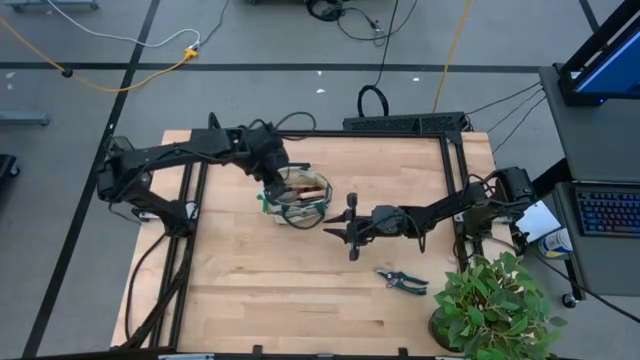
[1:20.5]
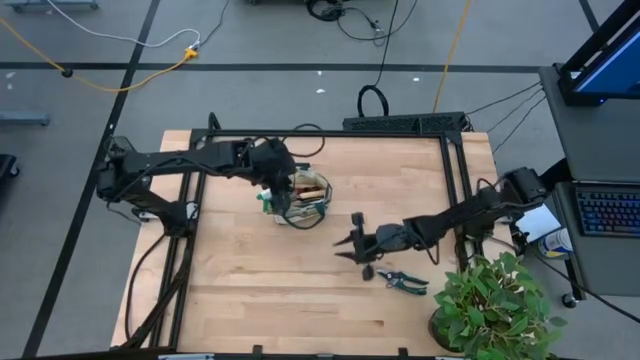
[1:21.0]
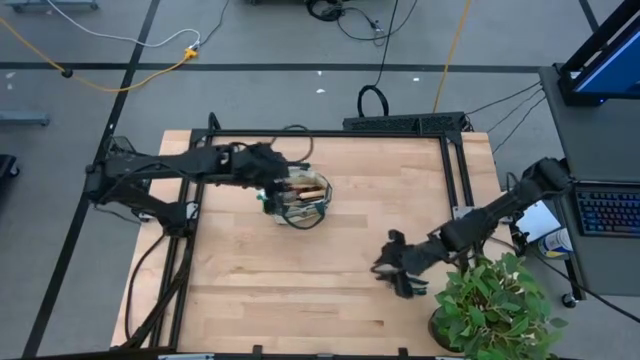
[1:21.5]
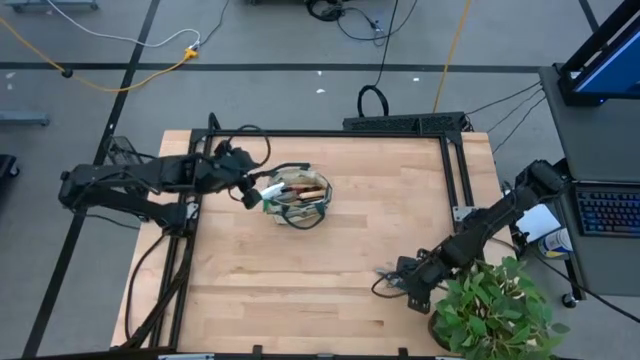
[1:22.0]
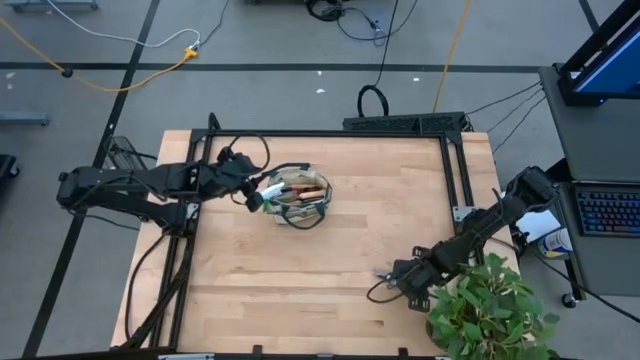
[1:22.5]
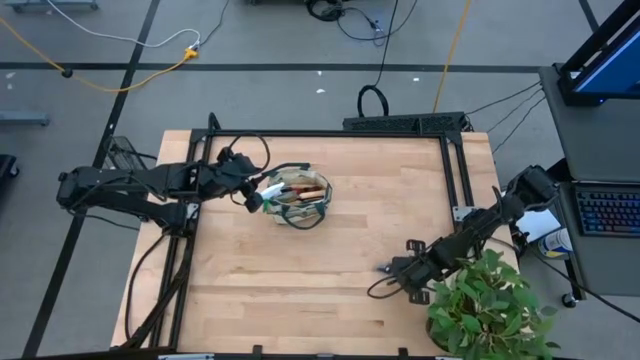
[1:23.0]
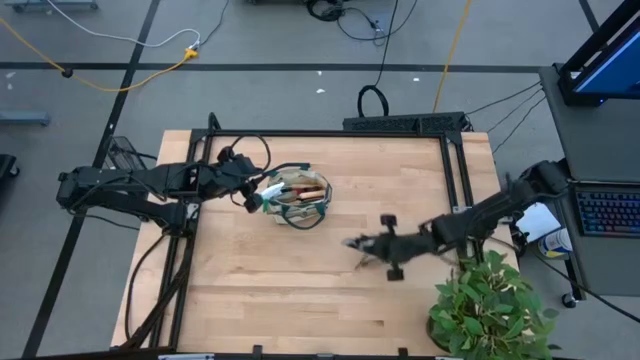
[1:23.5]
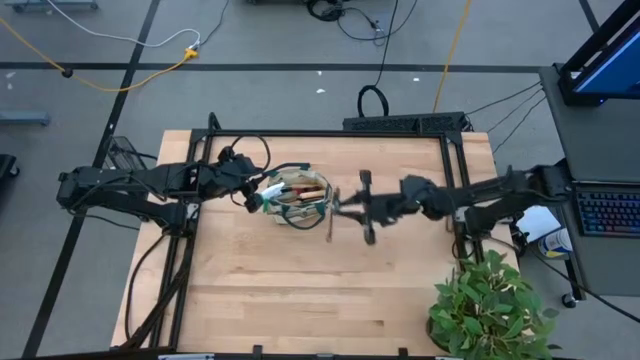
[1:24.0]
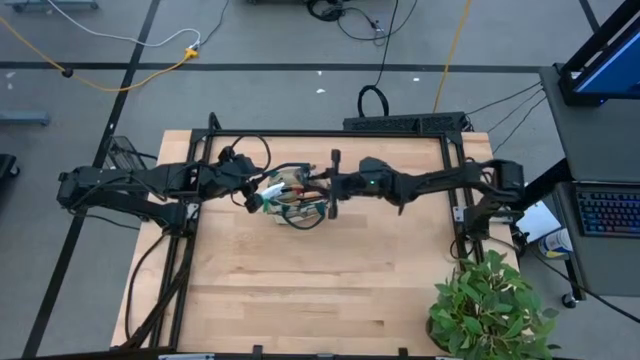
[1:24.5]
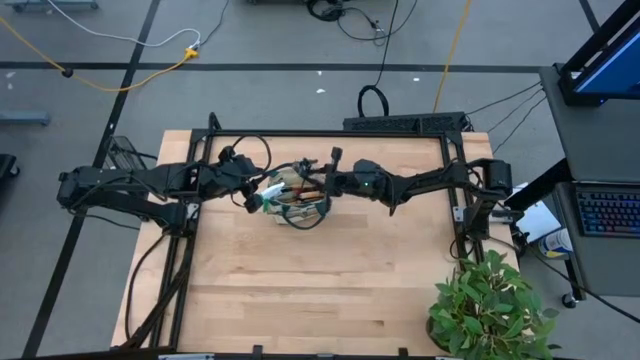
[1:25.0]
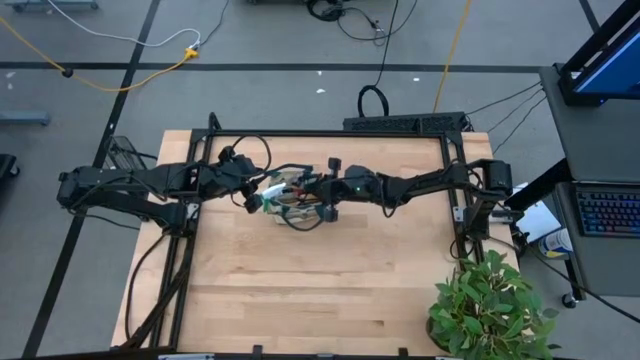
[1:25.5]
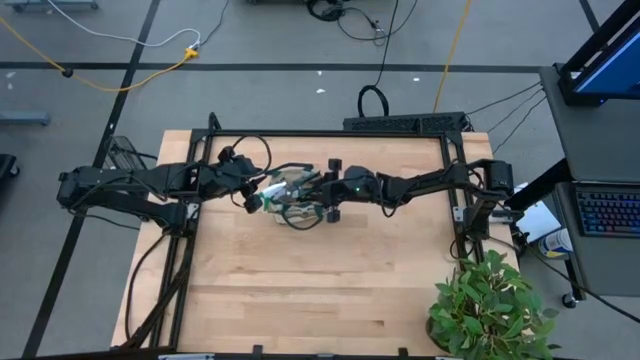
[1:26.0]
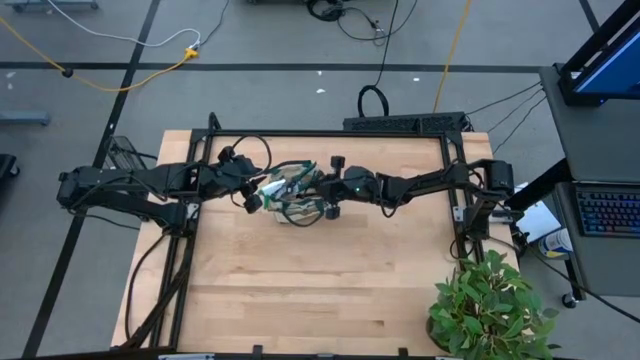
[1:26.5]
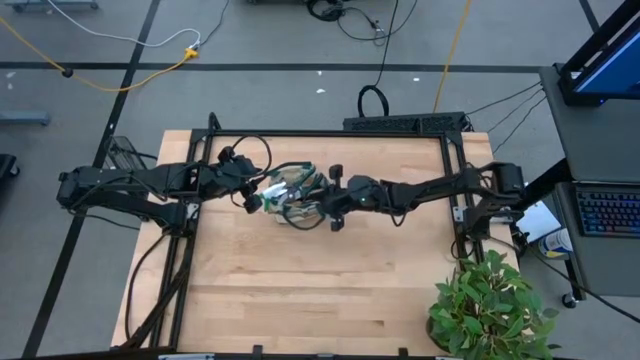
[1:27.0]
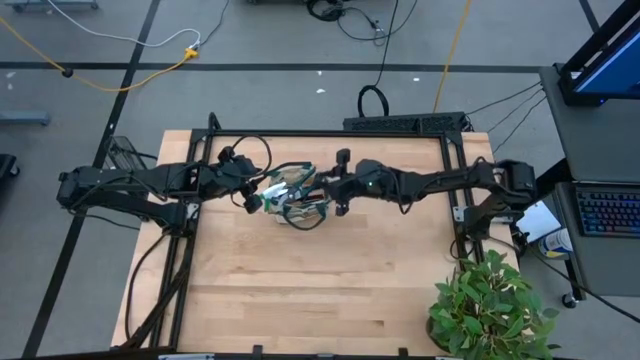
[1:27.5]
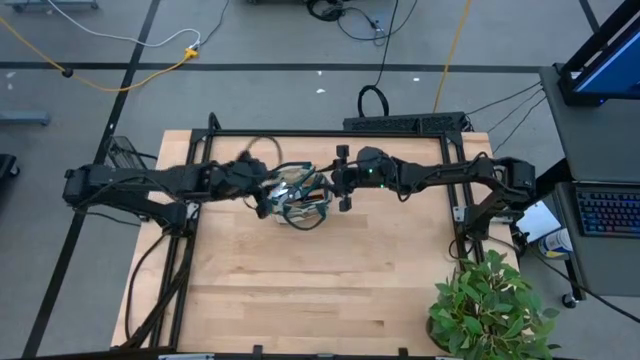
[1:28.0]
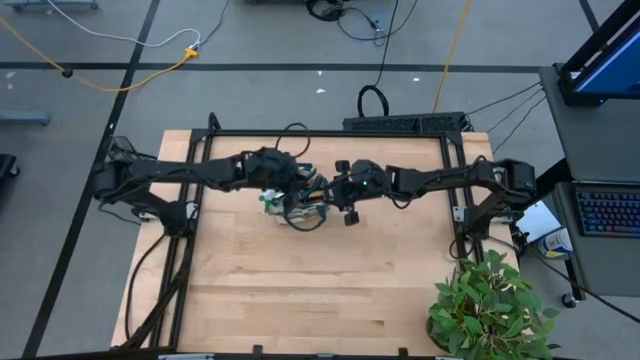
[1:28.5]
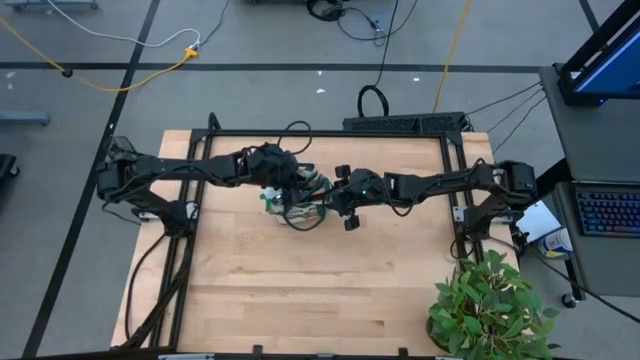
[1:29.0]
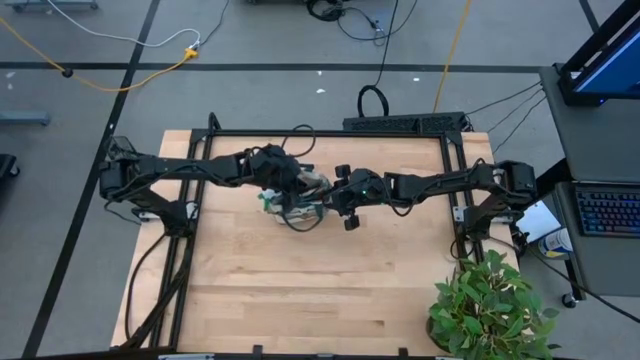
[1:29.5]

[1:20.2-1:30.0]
Task: Pick & Place Garden tools in Gardening bag
Put the shear scissors into the gardening bag

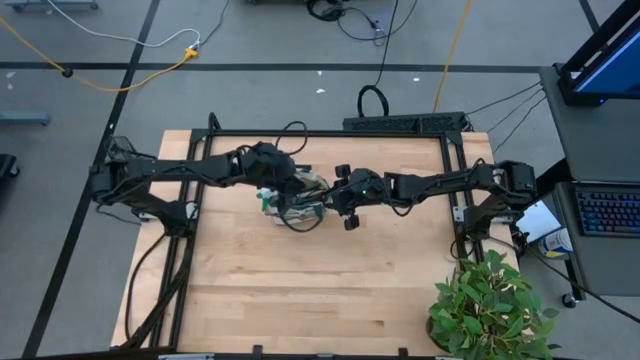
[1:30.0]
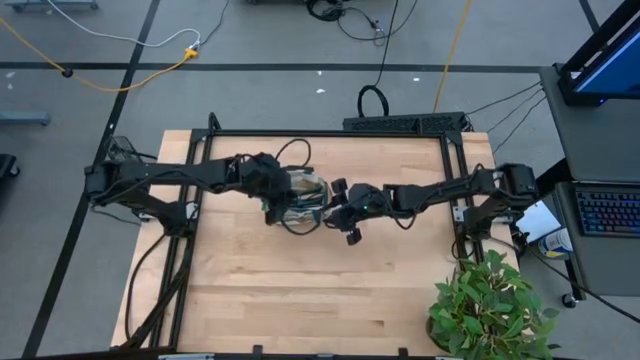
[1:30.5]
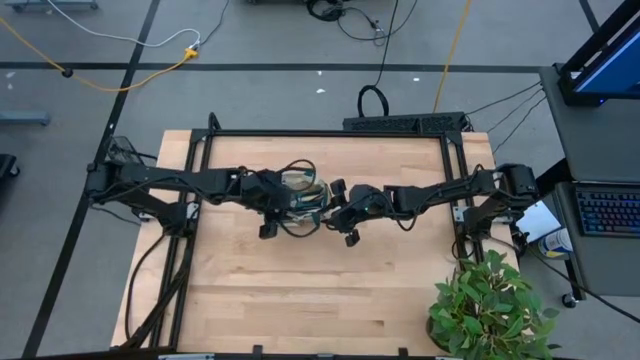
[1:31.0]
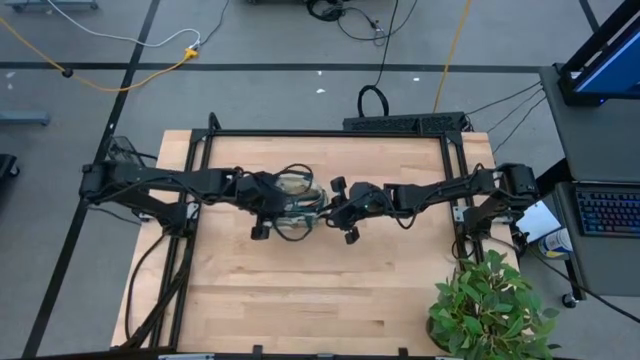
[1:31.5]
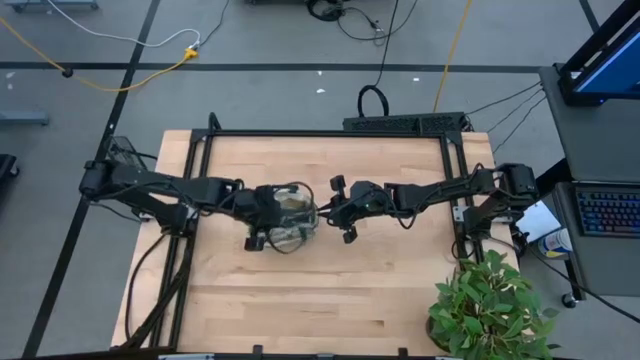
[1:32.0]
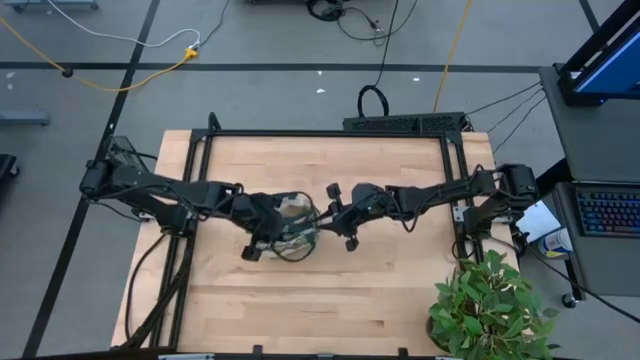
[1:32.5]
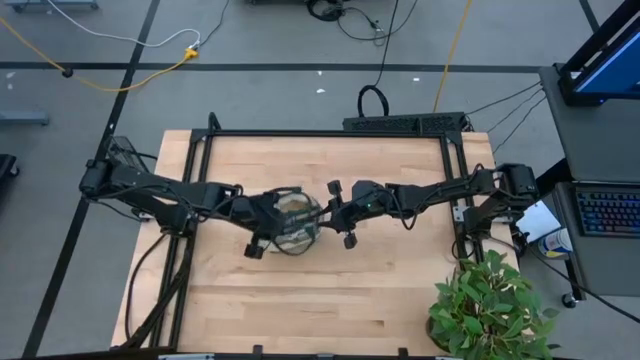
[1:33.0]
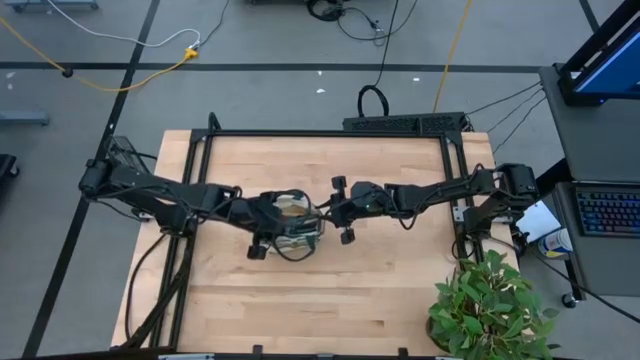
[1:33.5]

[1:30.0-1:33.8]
Adjust the gardening bag
